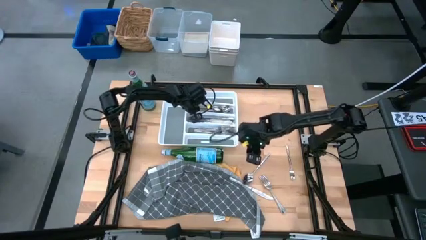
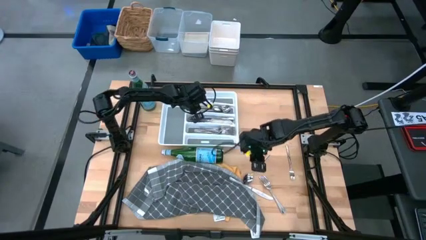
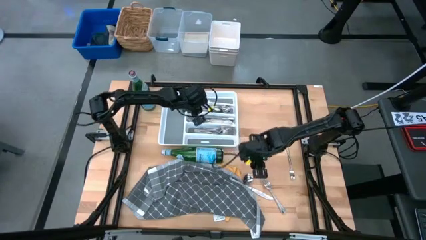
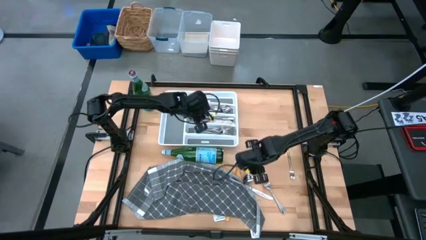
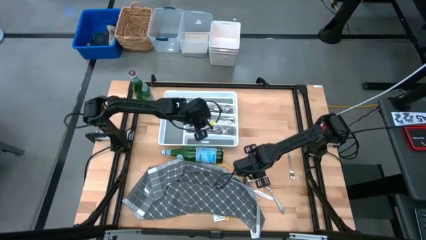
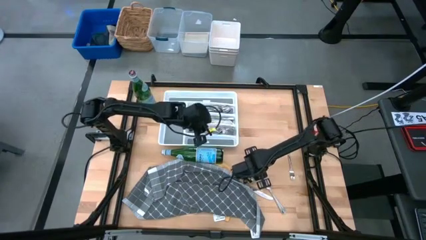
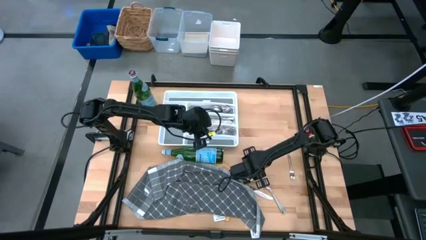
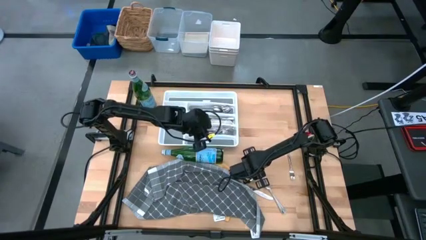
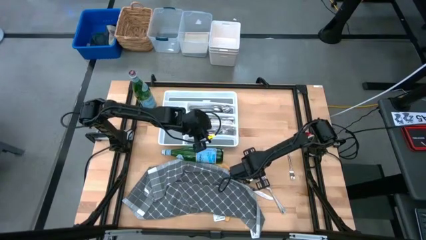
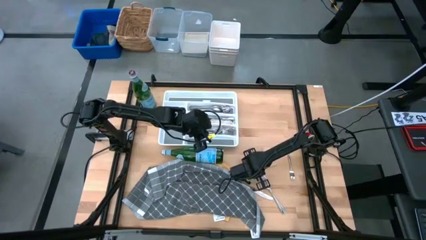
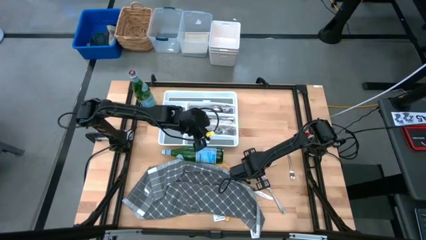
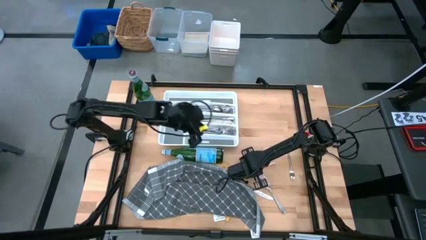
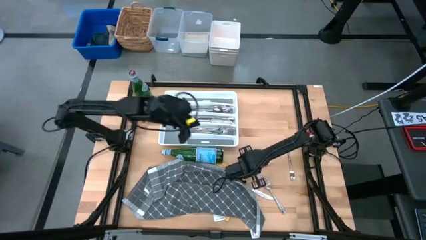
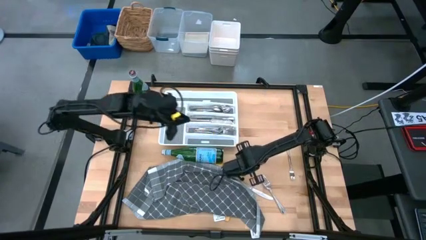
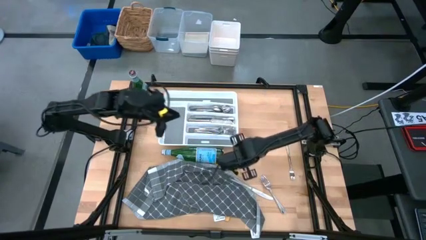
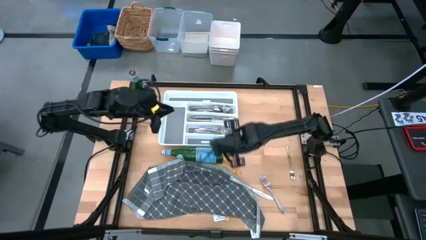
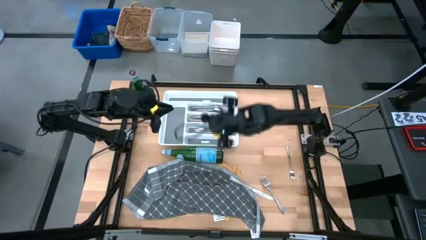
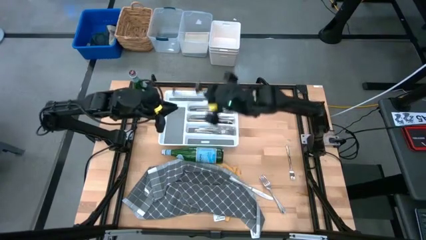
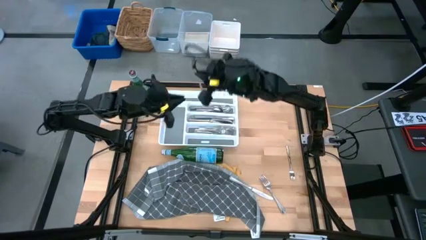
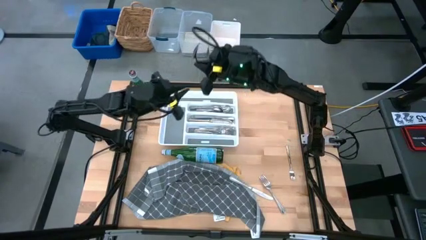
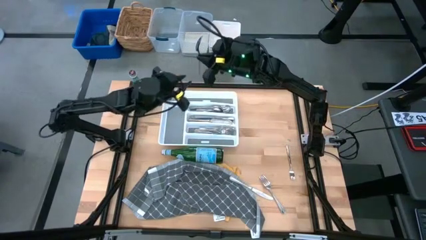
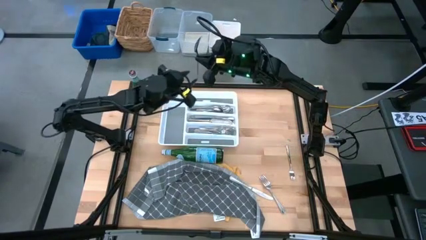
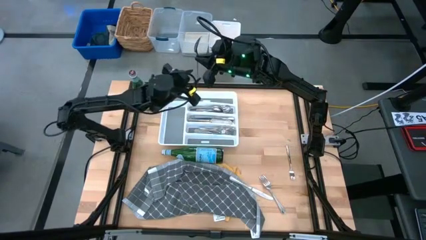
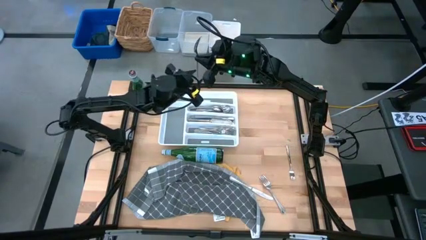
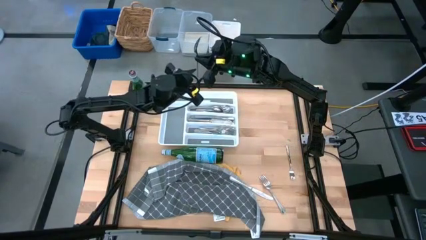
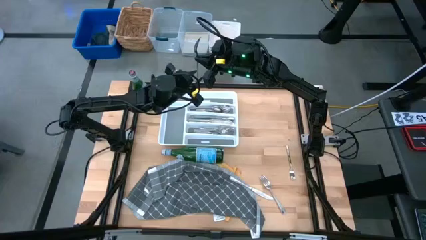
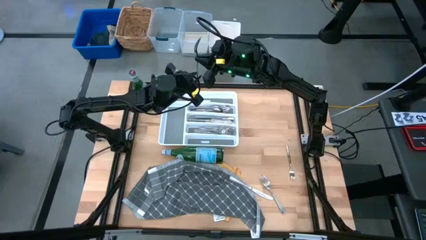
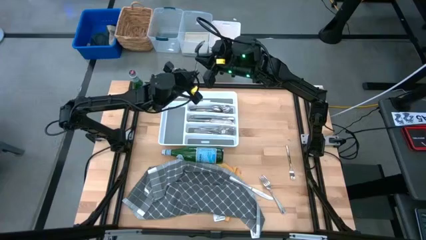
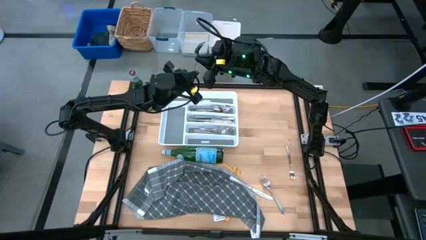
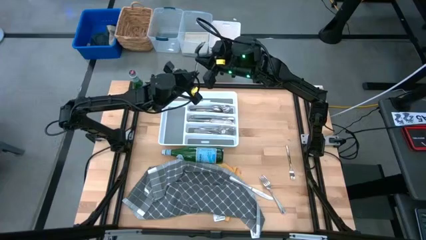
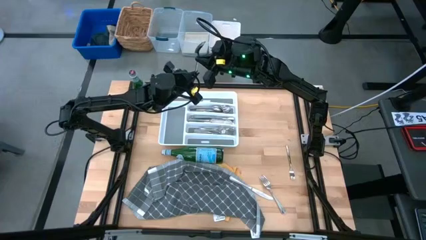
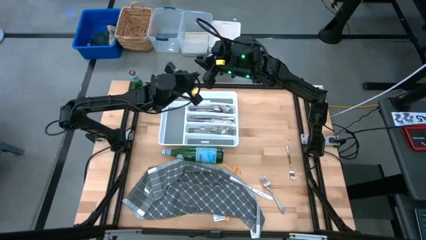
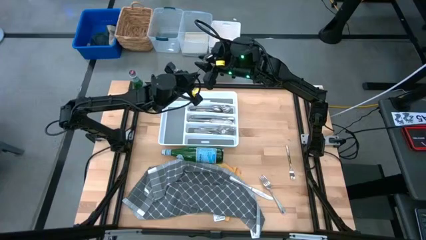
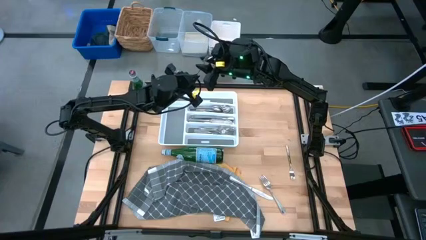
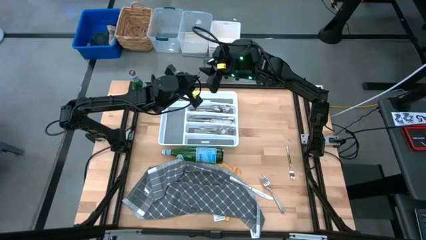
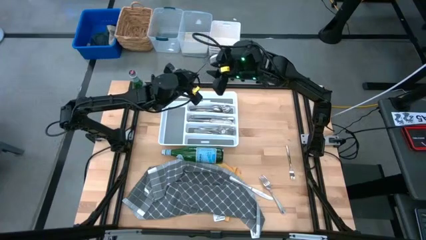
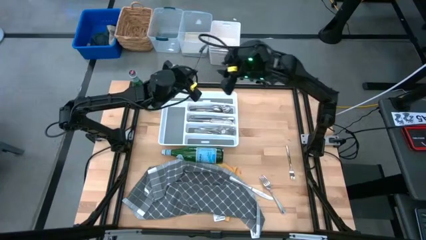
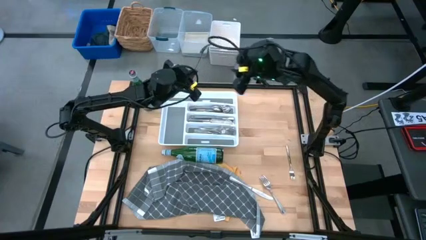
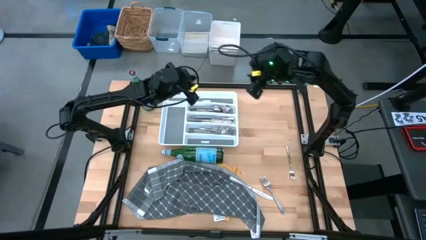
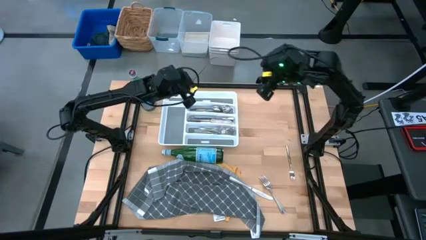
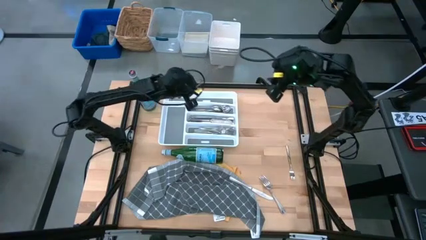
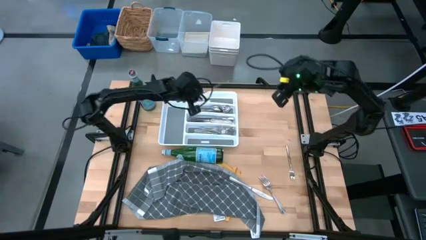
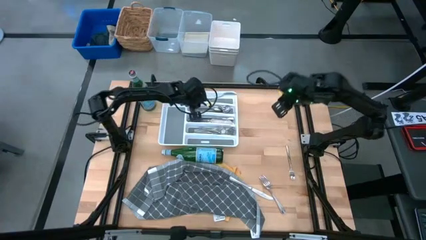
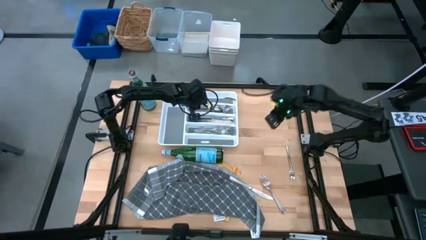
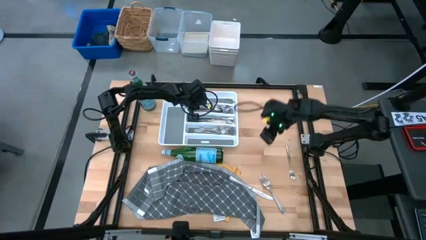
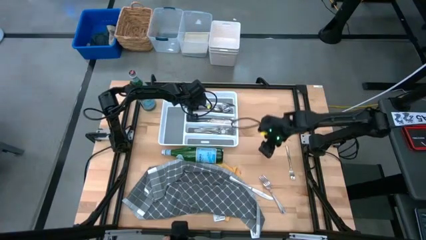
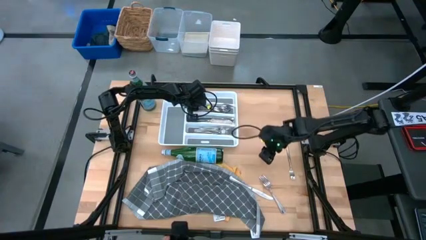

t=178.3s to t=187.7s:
Task: Sort silverware
Put the silver spoon into the silverware tray

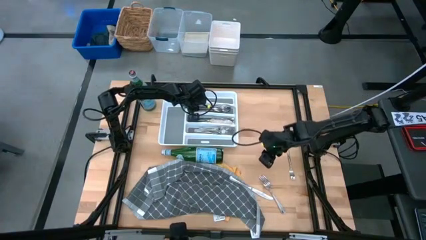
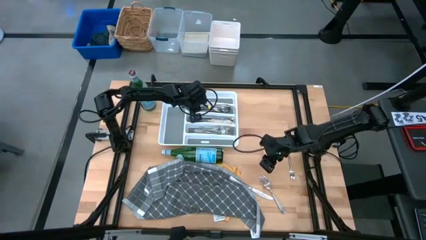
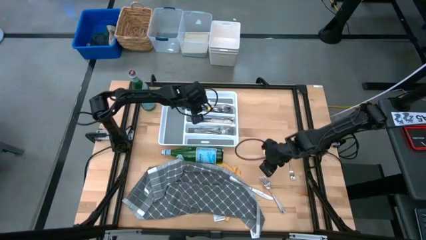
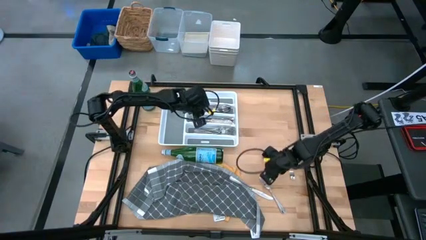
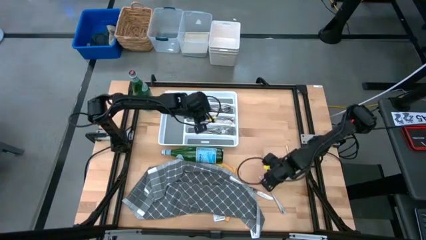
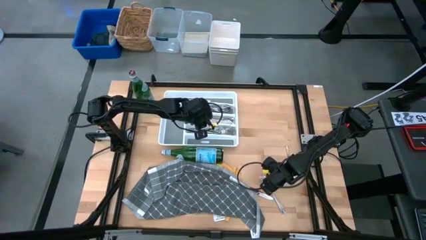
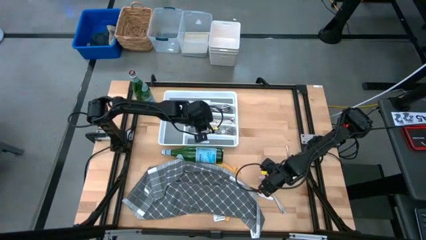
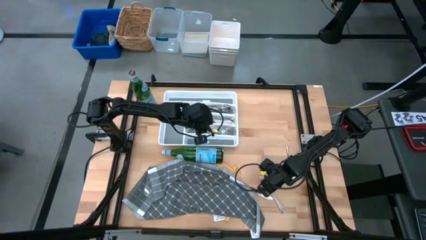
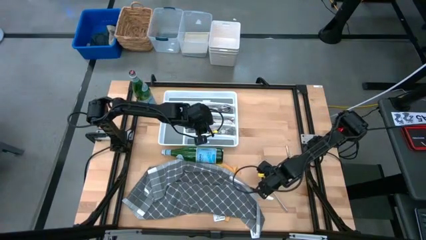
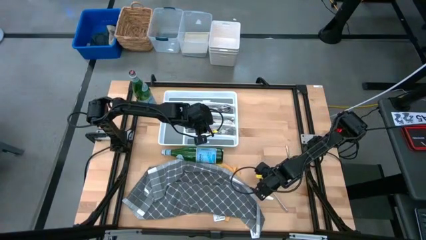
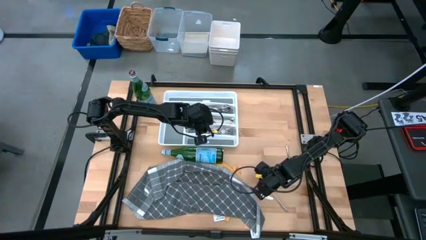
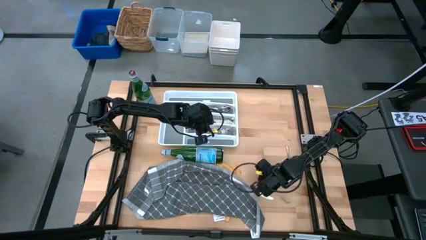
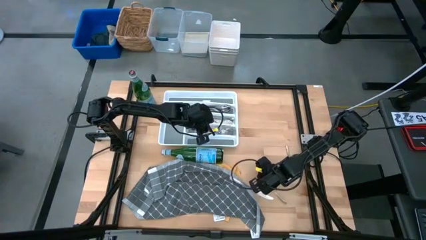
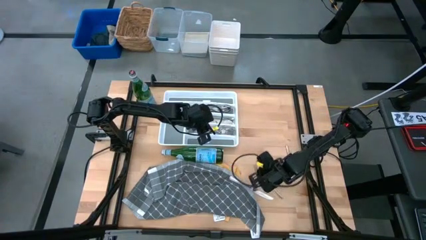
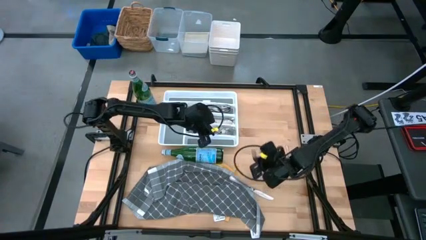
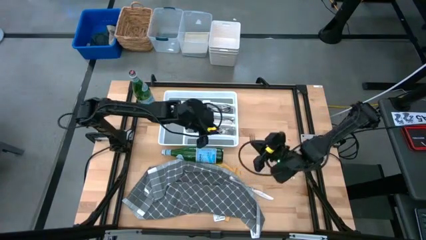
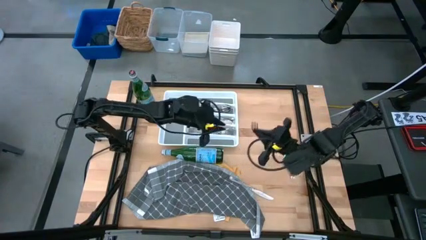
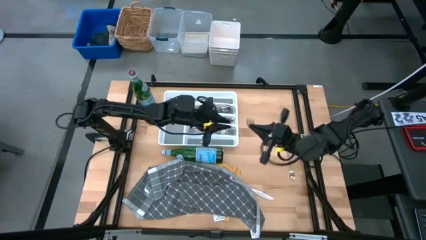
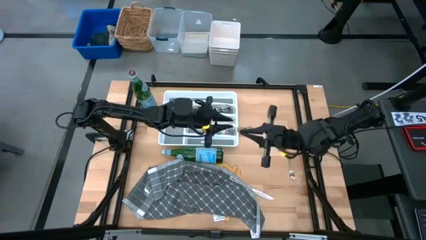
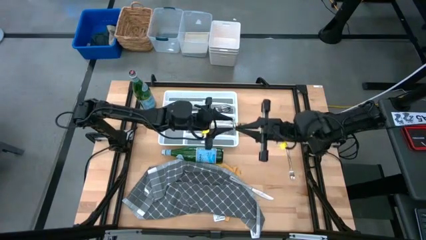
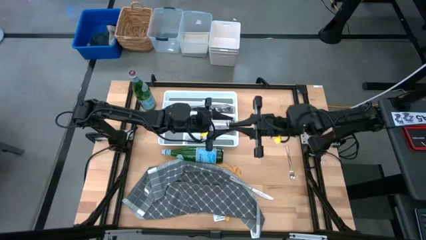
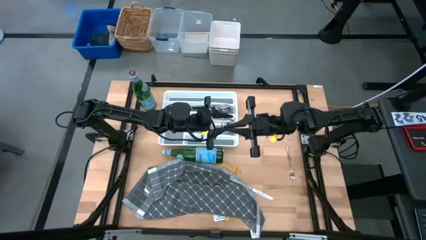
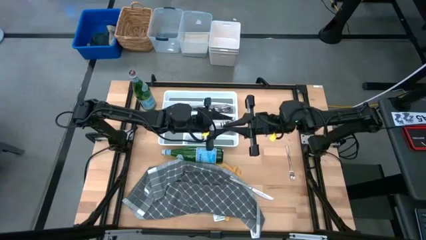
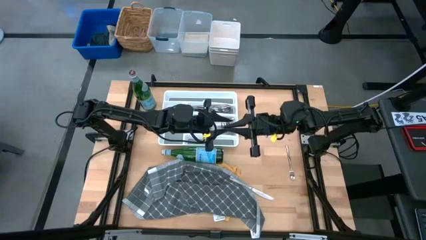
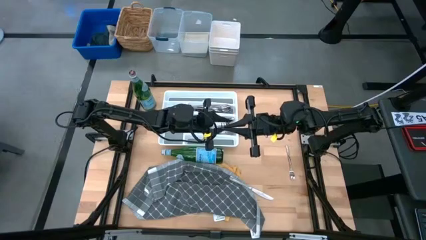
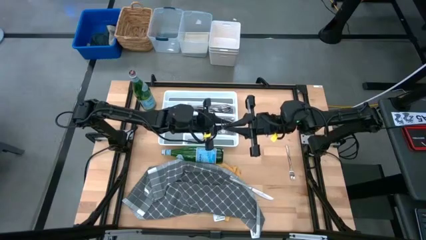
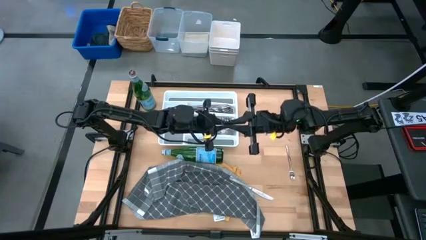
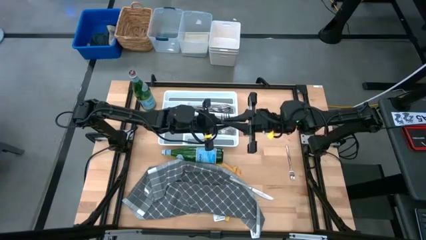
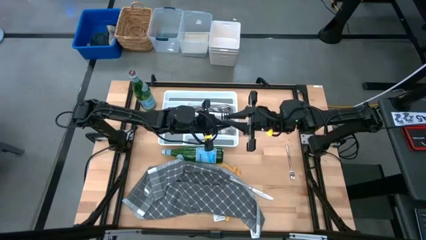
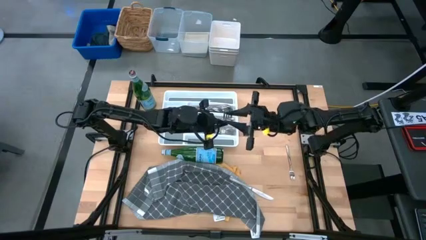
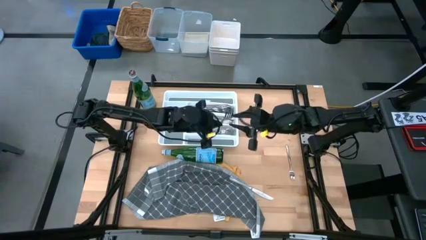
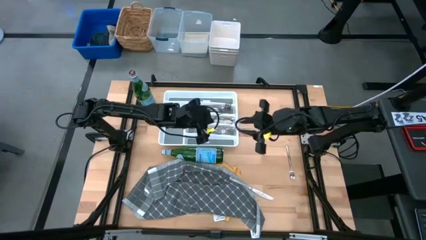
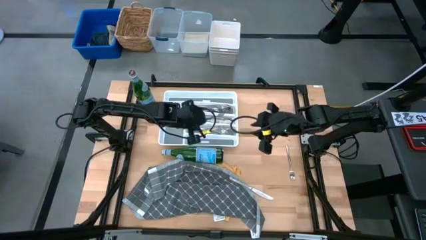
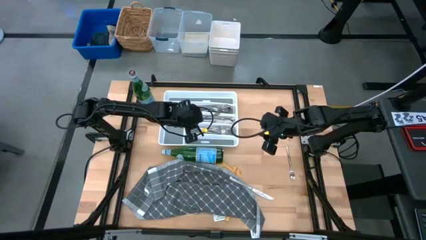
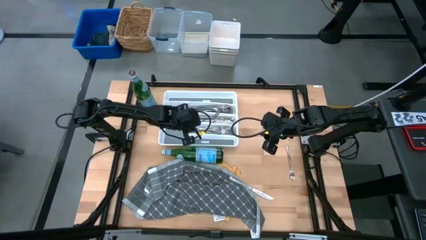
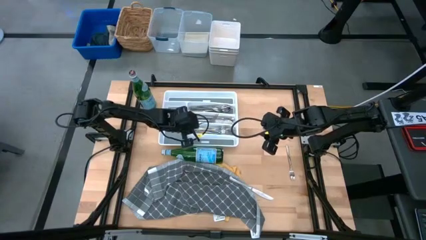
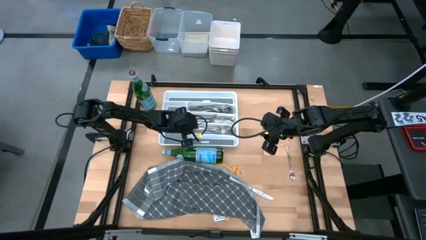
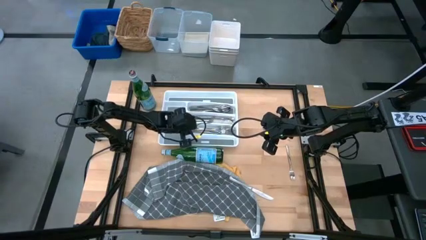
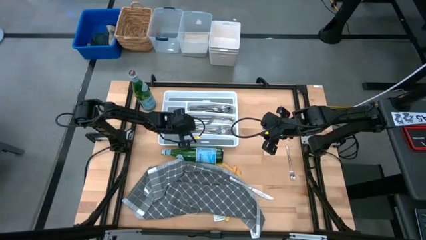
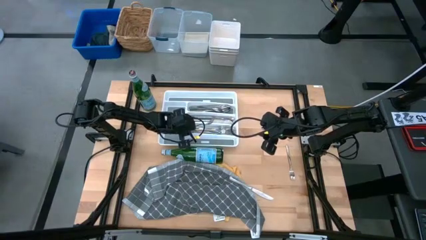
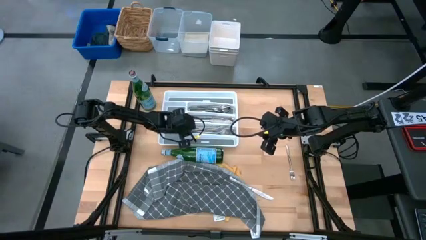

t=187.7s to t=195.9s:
Put the silver fork into the silverware tray
